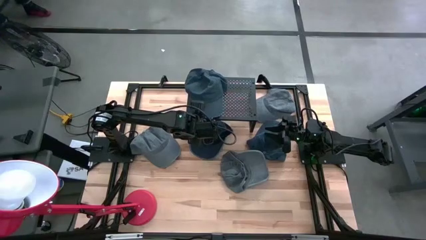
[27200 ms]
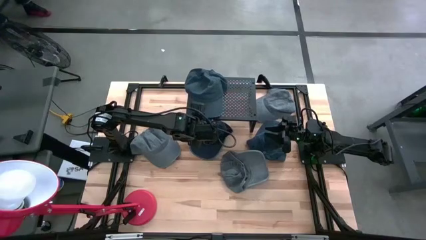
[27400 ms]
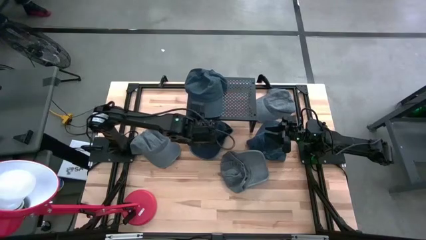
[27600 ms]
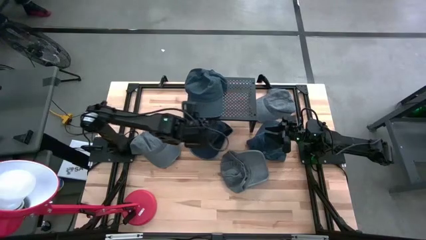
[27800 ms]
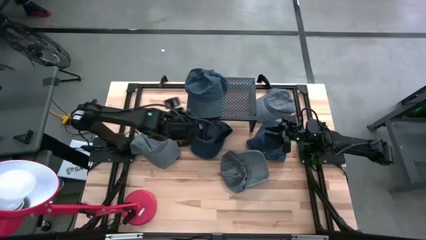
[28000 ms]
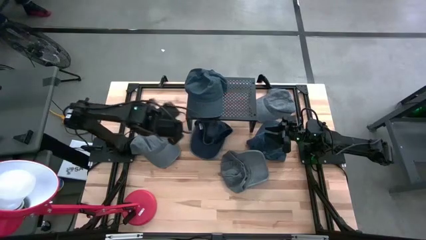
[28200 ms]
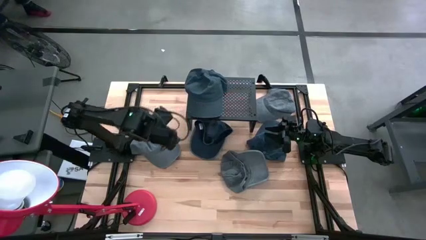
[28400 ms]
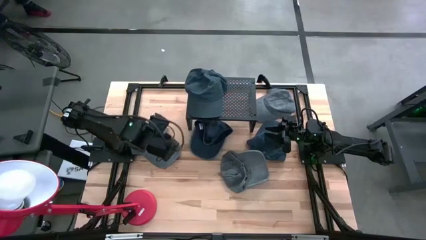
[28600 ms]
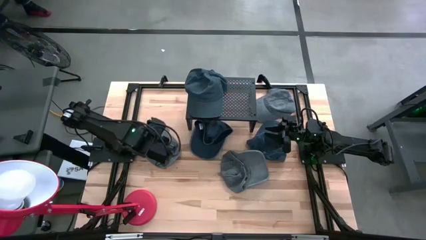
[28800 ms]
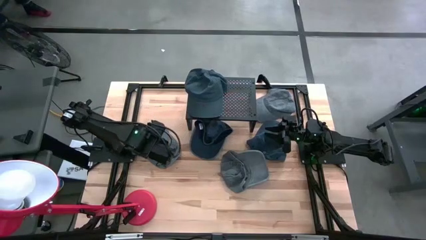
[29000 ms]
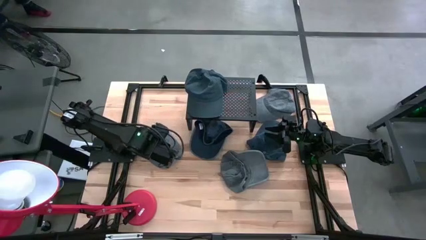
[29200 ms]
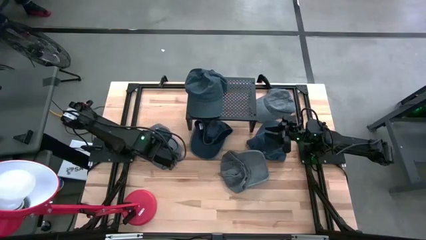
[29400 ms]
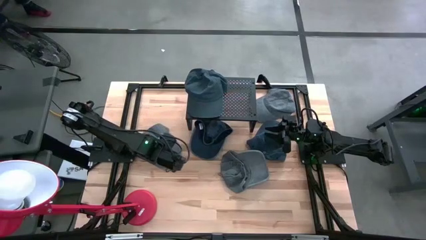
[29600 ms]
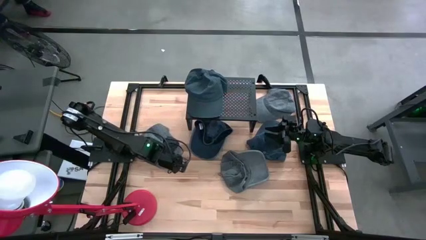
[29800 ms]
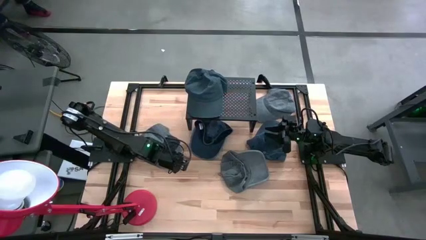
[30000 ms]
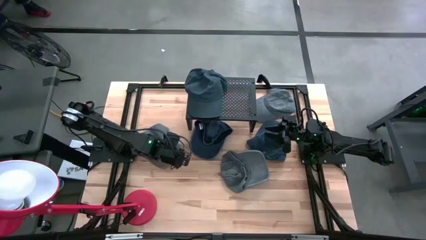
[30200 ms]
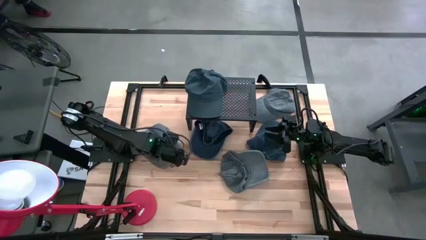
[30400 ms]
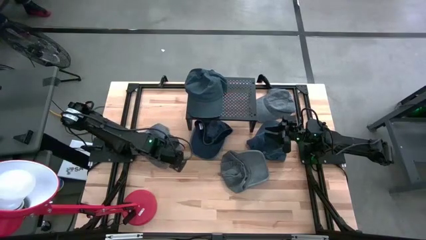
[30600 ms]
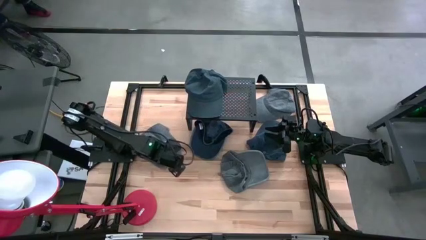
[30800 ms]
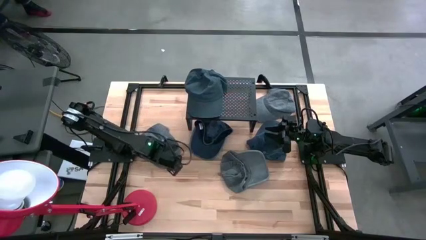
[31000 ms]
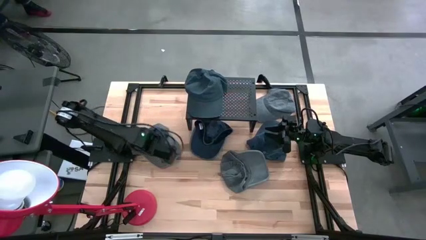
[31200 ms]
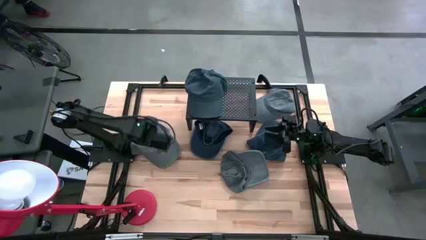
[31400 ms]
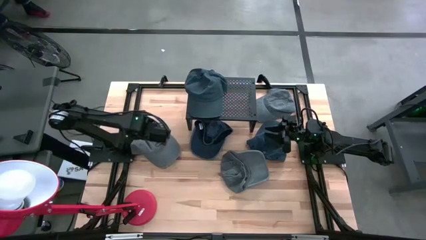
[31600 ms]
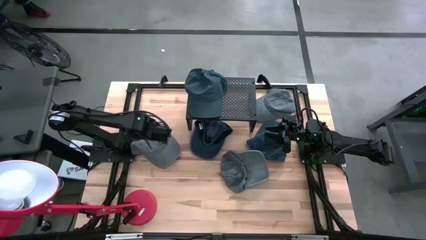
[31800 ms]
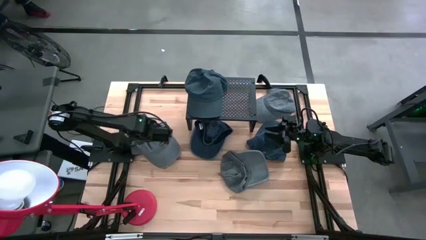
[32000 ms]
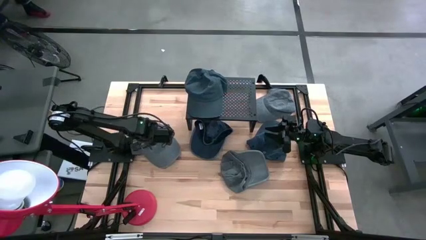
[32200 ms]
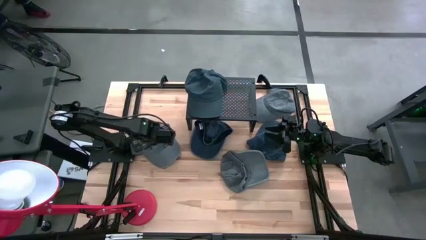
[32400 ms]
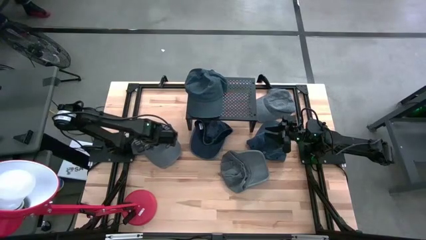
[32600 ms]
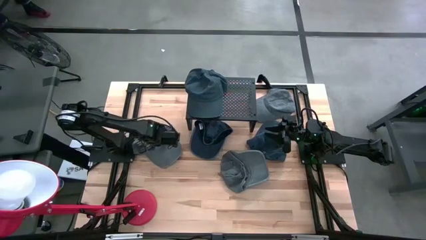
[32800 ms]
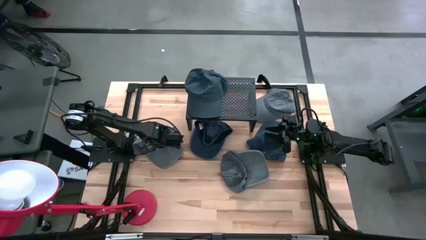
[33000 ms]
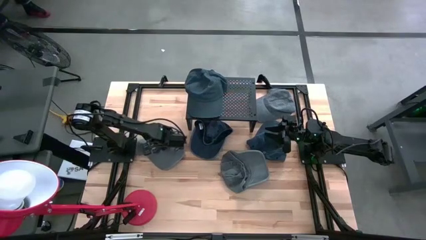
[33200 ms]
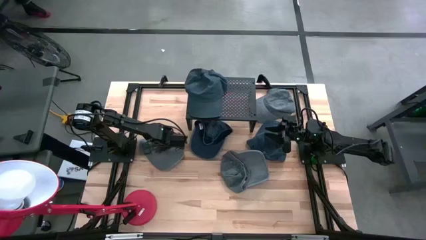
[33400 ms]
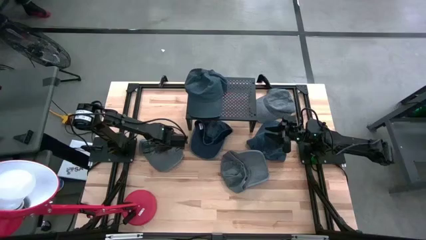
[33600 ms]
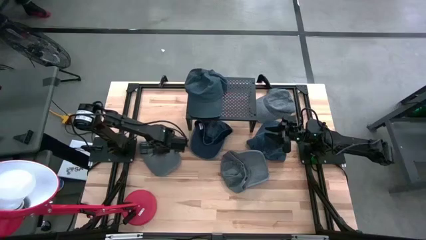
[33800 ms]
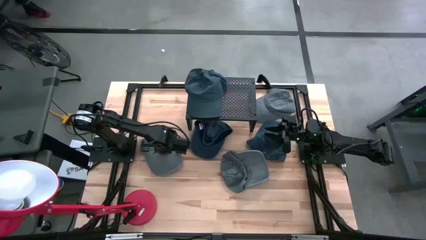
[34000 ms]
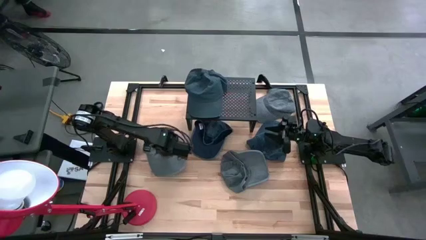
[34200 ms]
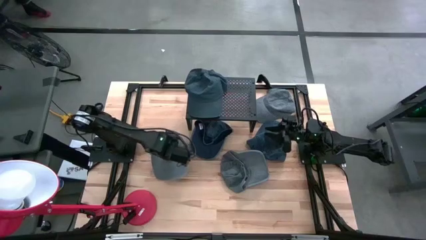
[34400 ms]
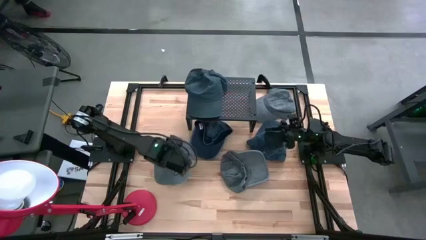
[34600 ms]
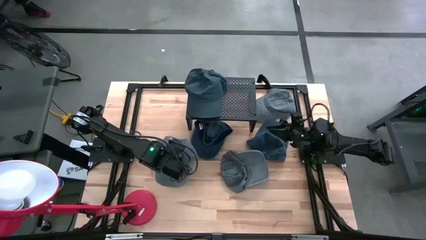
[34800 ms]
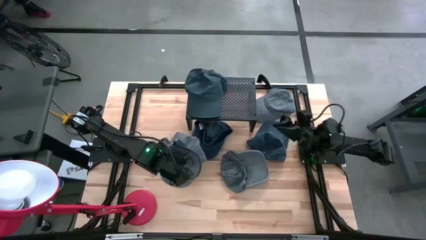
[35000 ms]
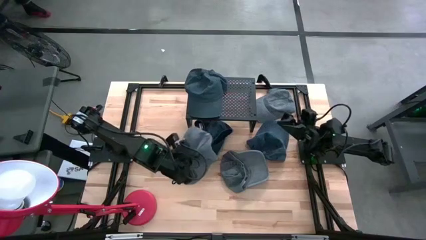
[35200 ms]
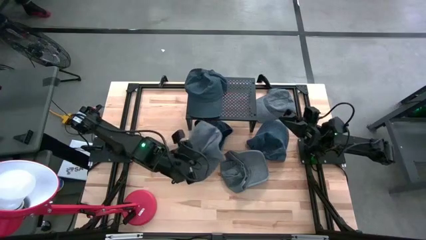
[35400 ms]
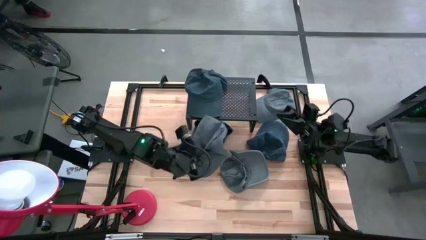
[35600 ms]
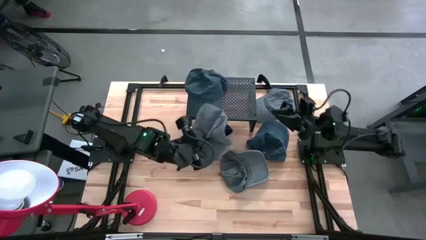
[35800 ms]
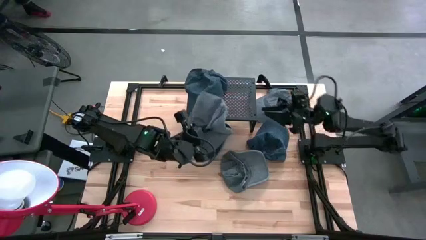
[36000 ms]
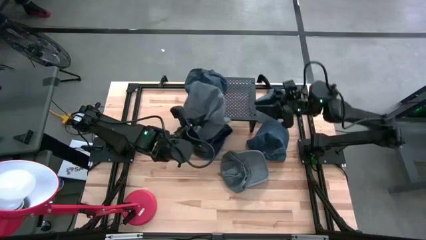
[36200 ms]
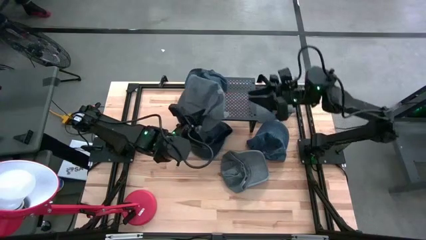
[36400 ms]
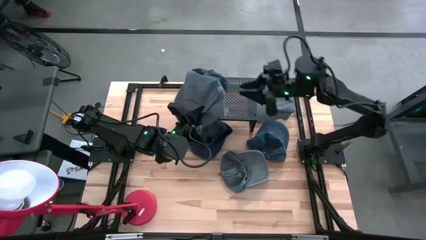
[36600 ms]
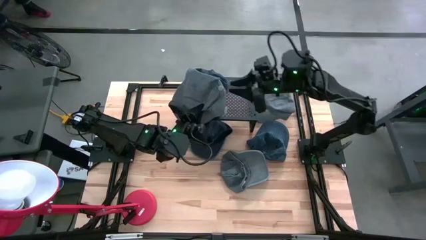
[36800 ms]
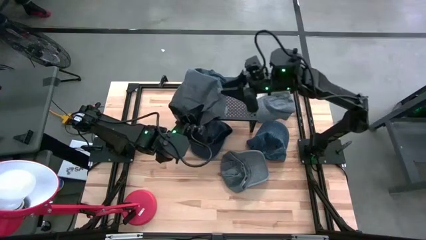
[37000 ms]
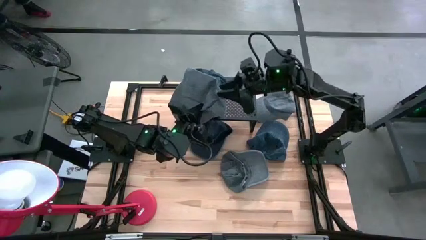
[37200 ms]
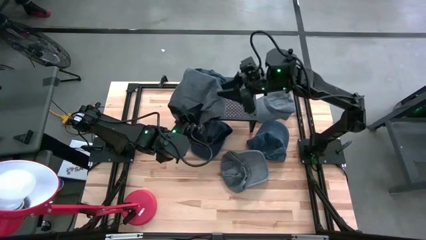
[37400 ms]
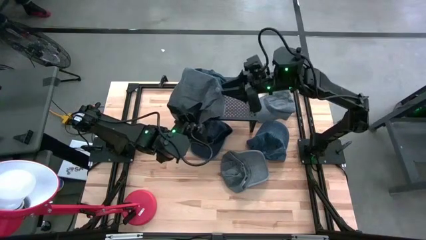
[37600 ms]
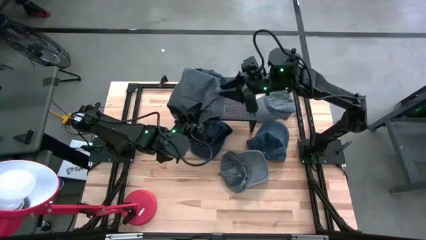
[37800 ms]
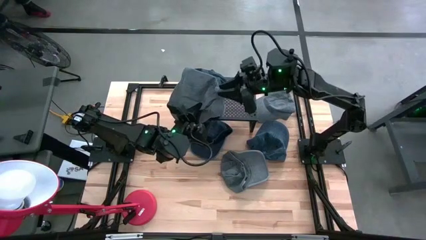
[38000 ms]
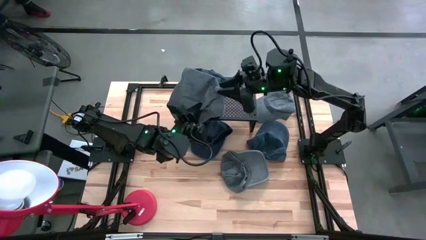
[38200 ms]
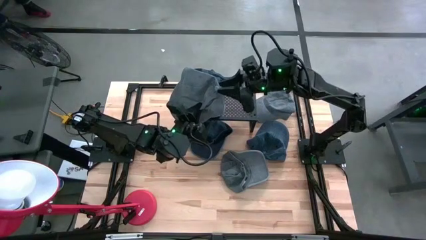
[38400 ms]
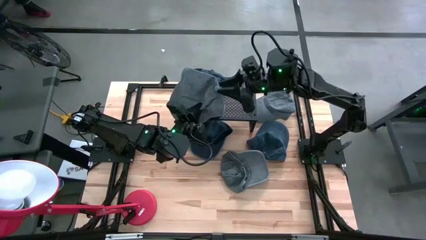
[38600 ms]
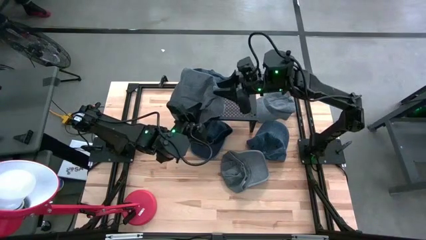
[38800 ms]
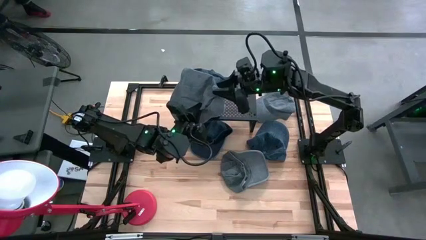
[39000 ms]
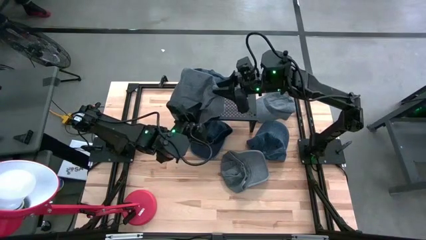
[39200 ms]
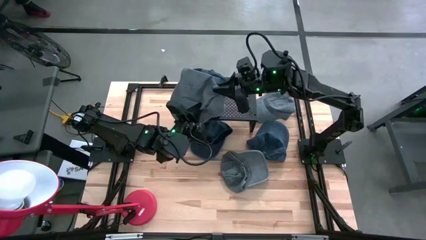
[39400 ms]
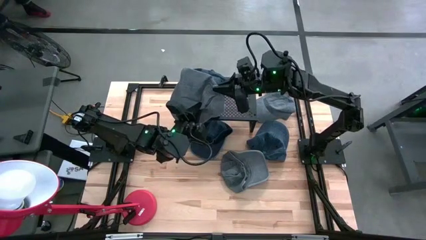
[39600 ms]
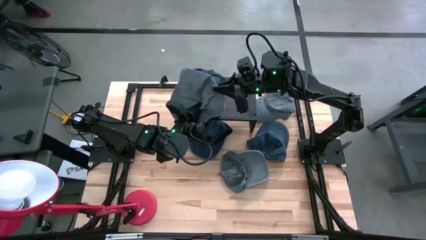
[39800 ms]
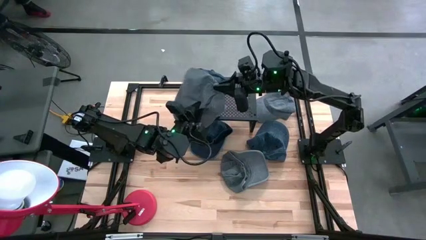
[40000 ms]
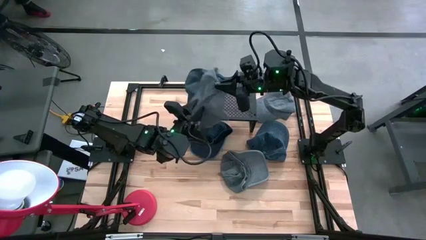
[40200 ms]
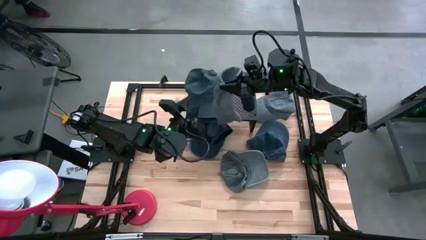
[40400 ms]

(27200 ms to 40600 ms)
Task: Pick & Place hat
Put the bottom left gray cap on the shelf

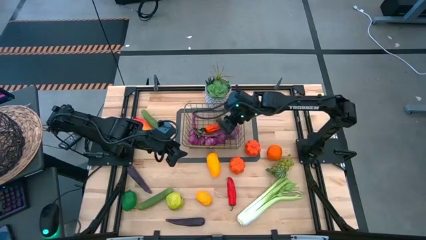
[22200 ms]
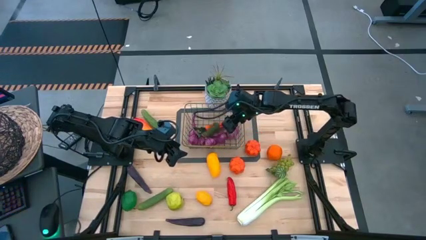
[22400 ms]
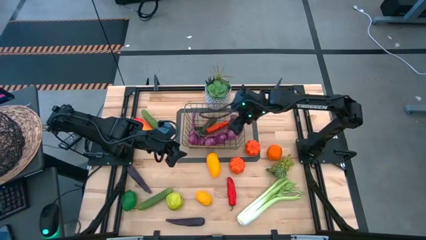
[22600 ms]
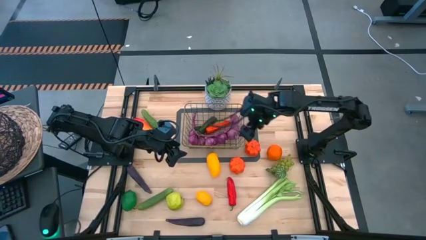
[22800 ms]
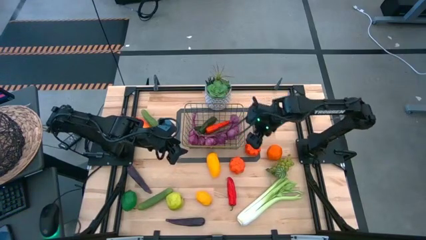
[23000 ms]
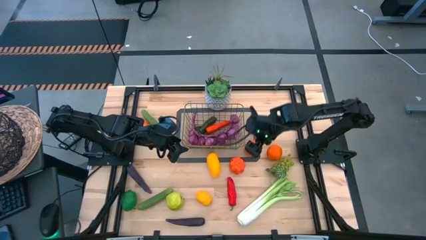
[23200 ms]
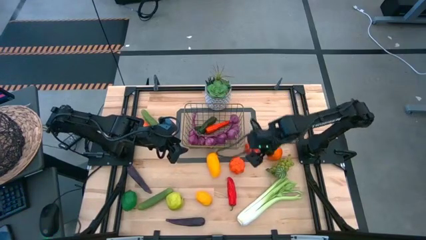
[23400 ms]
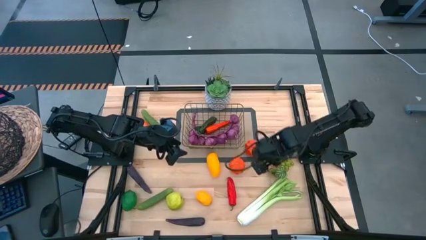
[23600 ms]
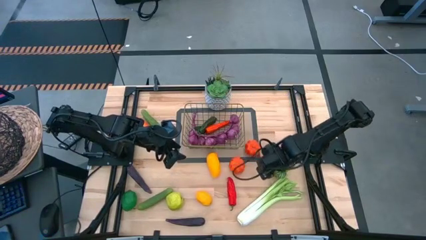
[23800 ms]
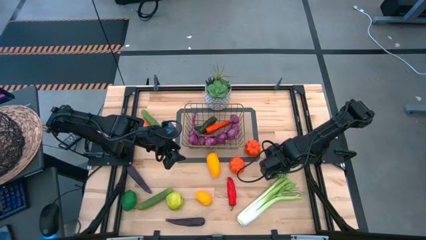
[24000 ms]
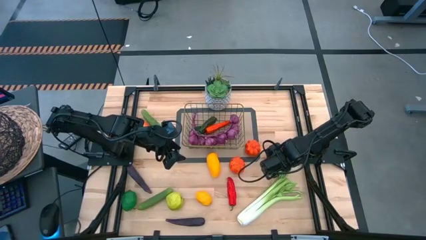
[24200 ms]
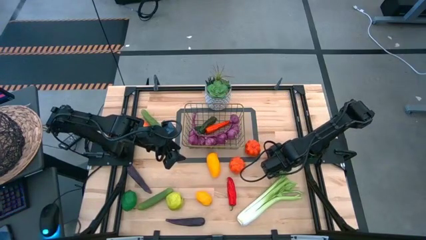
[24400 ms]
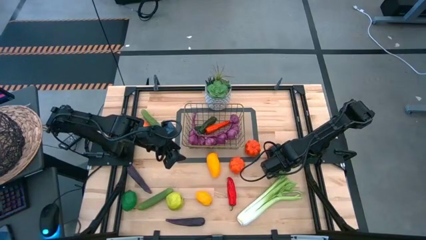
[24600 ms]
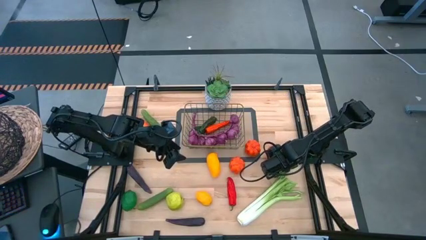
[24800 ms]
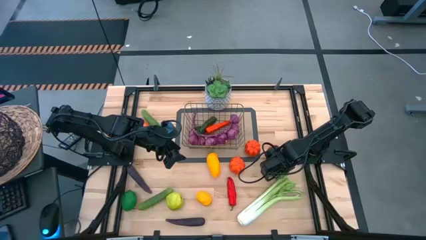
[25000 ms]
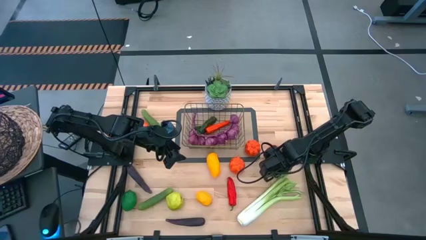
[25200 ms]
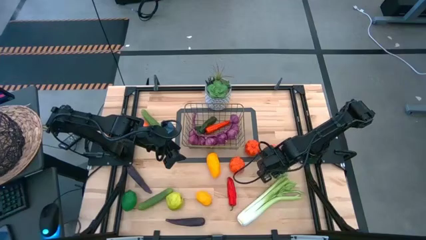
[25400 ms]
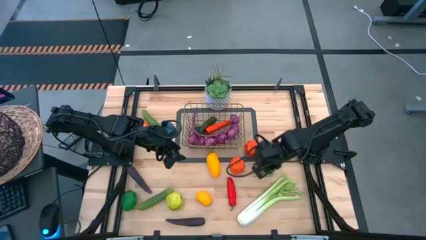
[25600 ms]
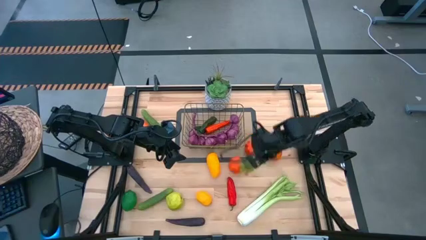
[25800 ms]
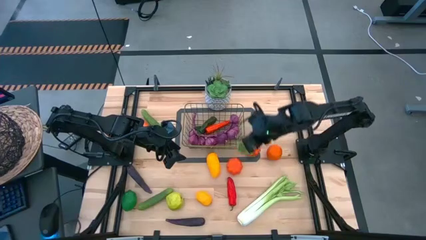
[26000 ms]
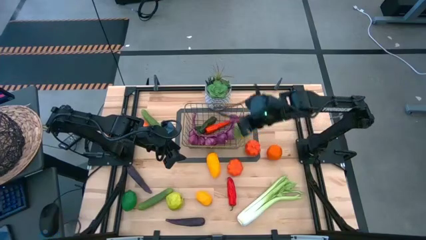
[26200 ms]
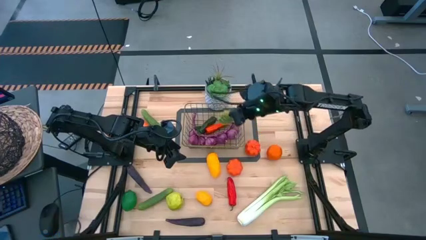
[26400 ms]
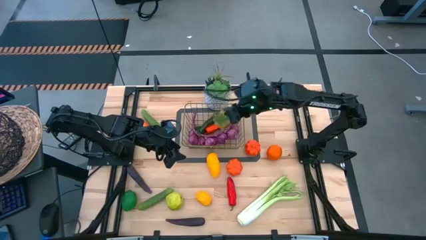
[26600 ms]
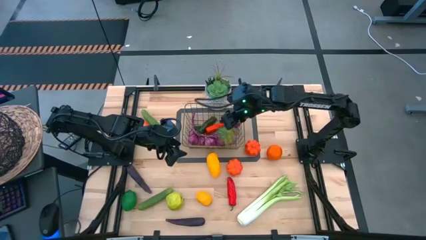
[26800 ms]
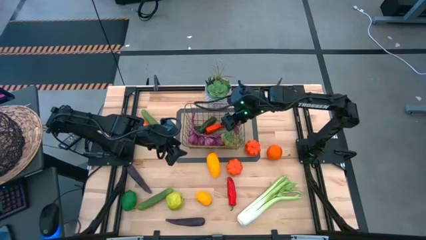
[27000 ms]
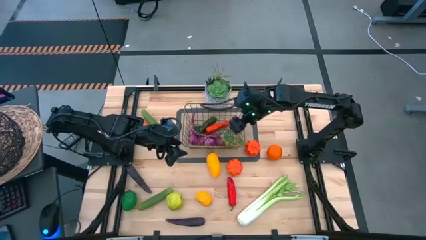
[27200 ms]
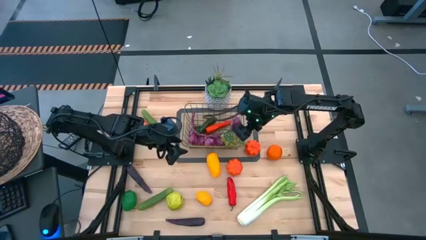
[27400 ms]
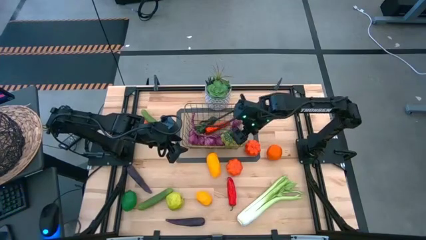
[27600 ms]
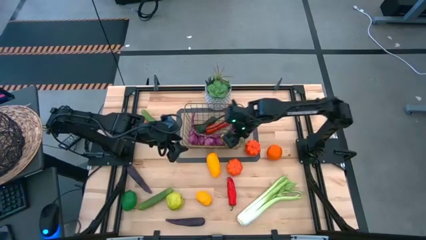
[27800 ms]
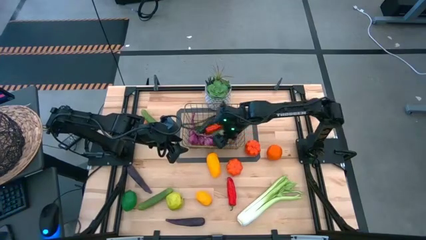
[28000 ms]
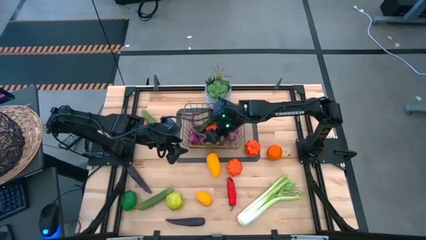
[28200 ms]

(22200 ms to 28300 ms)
Task: Build produce basket
Put the green grapes into the wire basket
